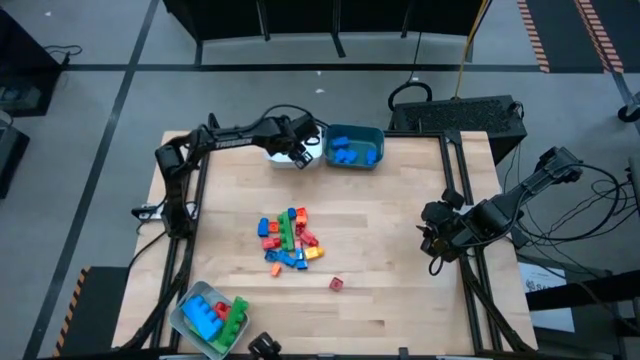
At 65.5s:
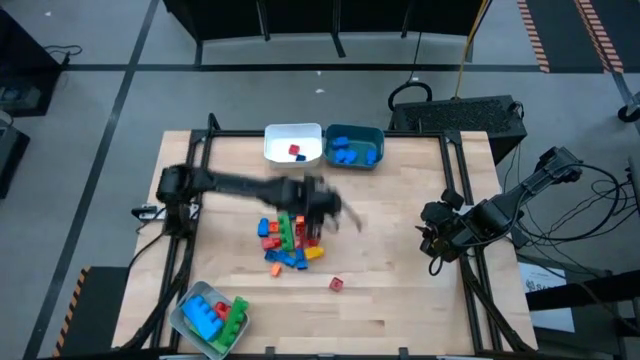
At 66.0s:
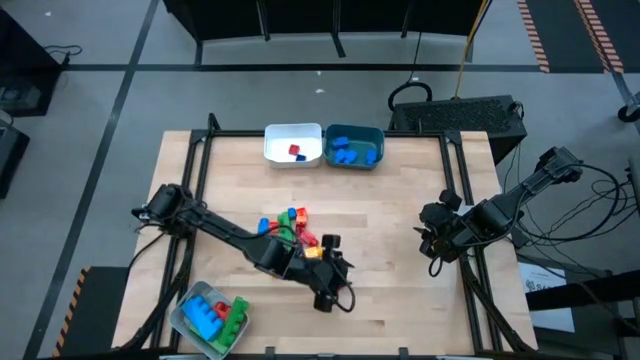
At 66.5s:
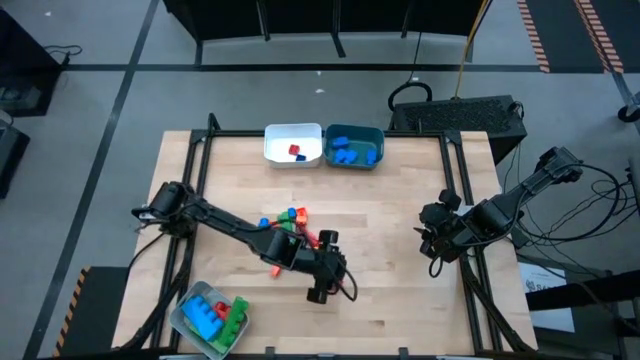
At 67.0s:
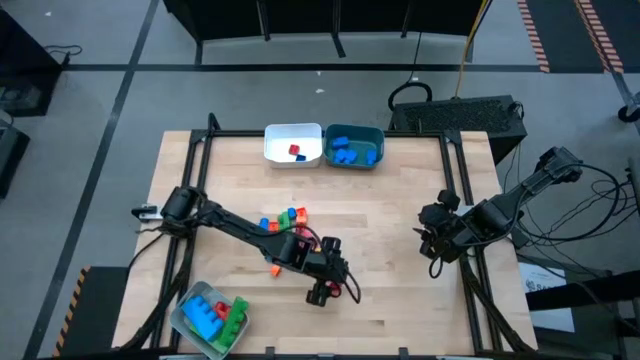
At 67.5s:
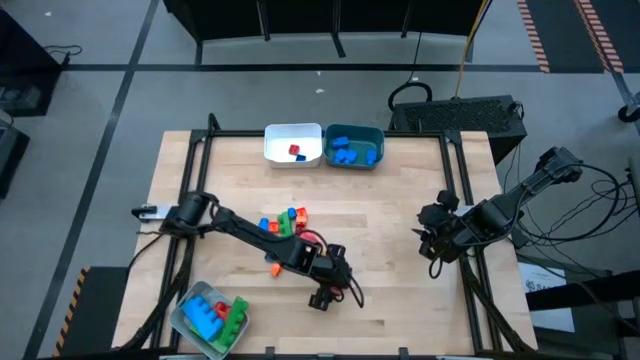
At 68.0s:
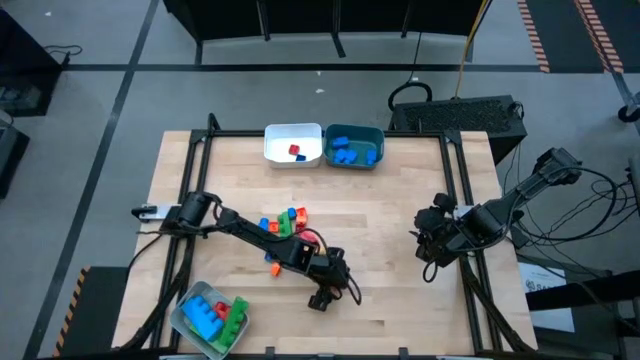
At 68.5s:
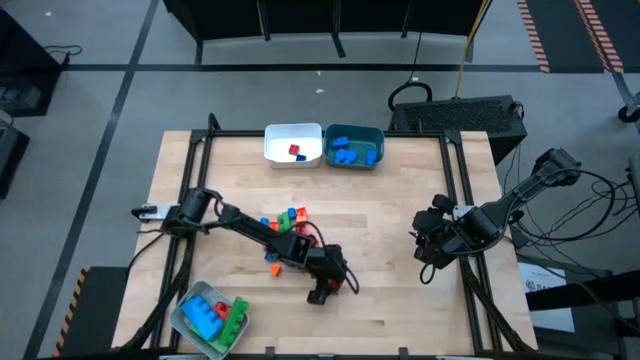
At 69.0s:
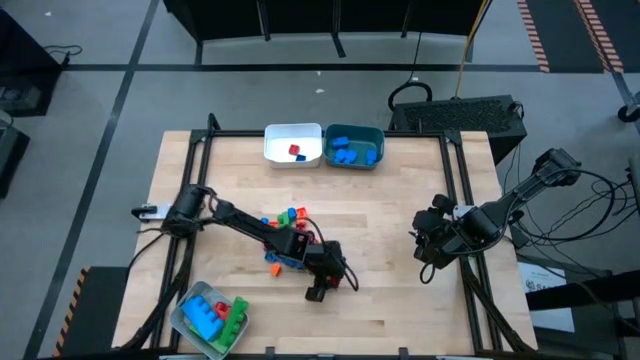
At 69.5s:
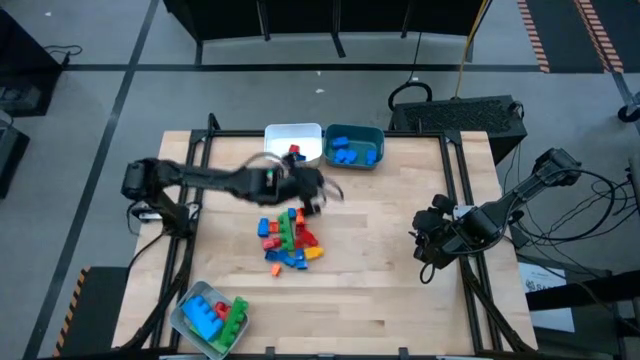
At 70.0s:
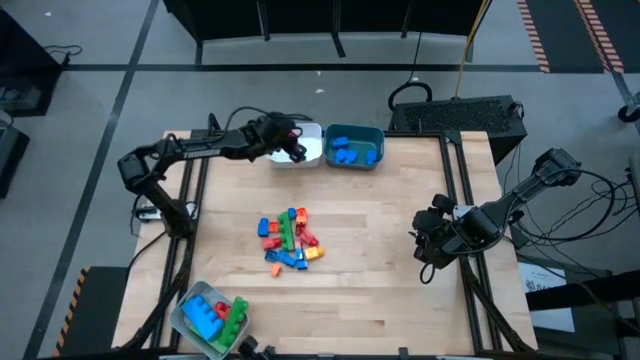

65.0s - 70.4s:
Task: Sort blocks by size
Put the red cube 4 stud game piece into the white bin

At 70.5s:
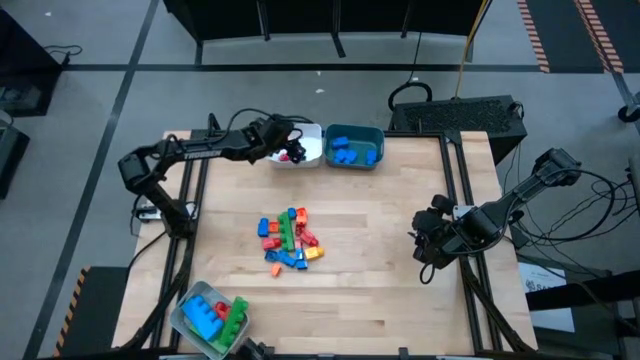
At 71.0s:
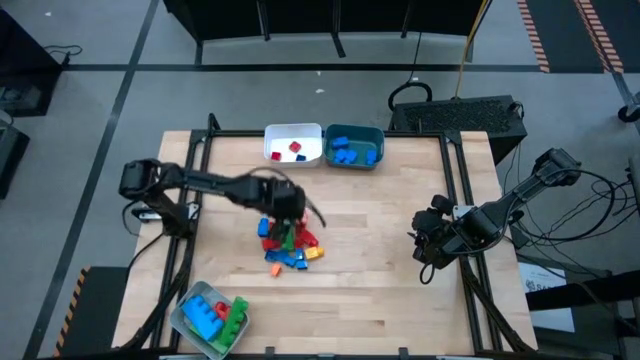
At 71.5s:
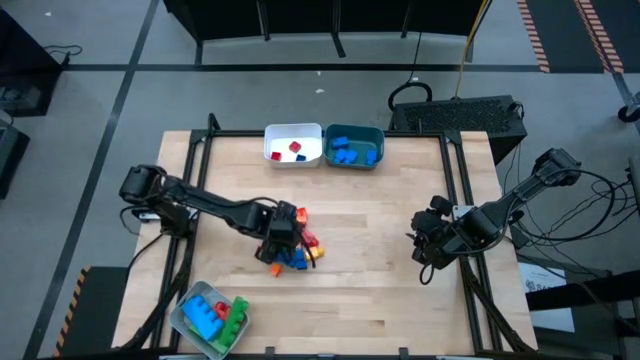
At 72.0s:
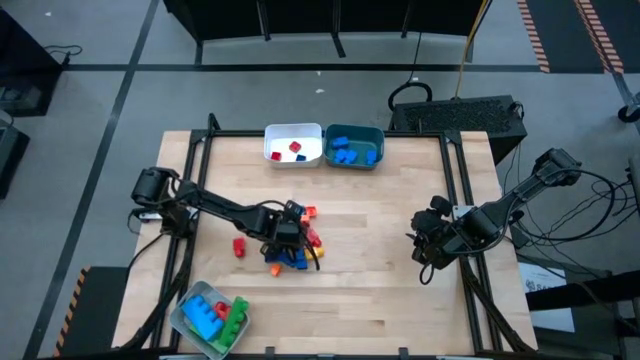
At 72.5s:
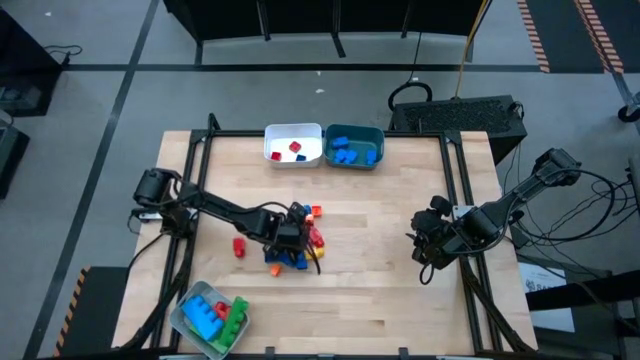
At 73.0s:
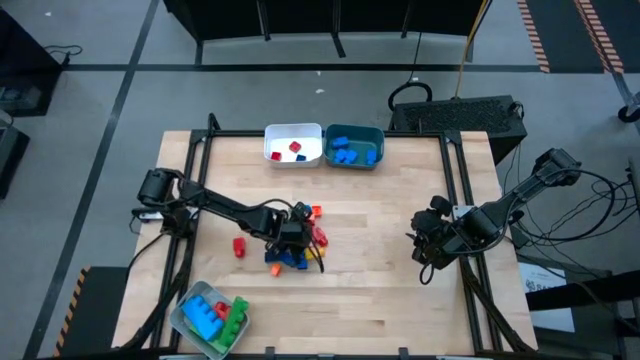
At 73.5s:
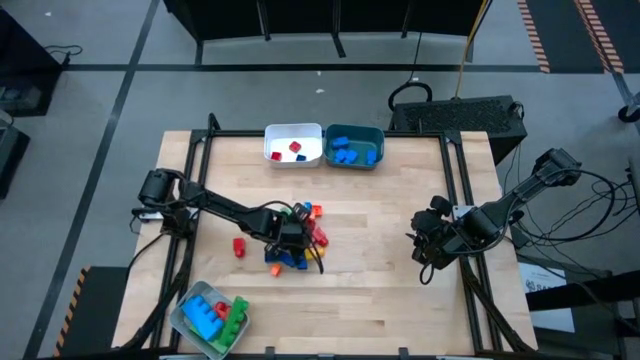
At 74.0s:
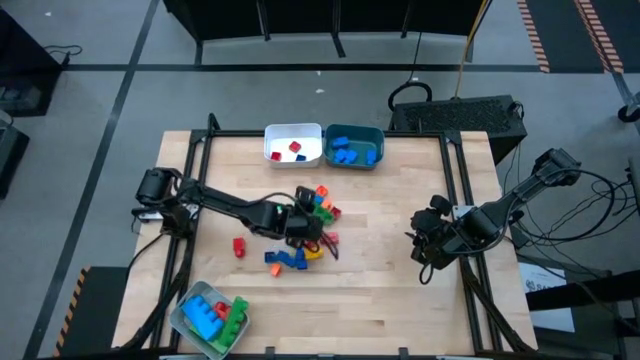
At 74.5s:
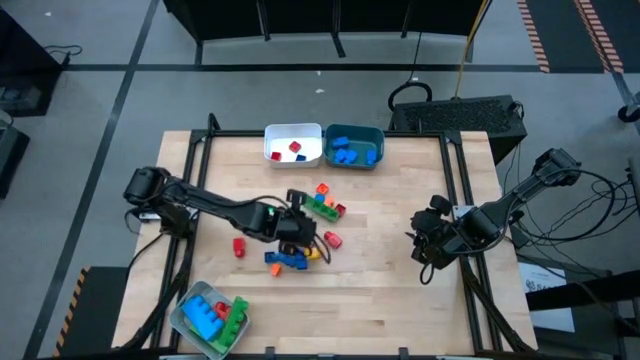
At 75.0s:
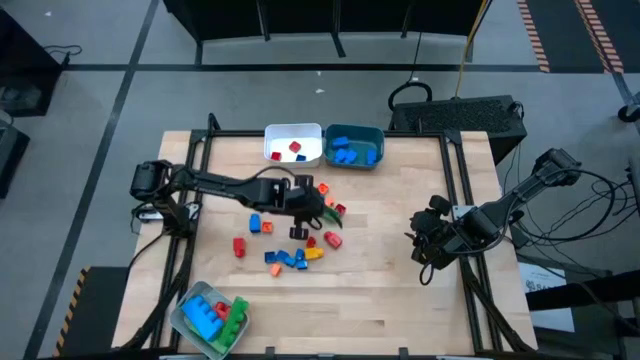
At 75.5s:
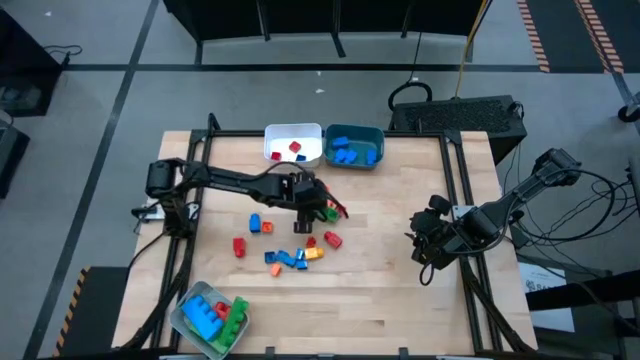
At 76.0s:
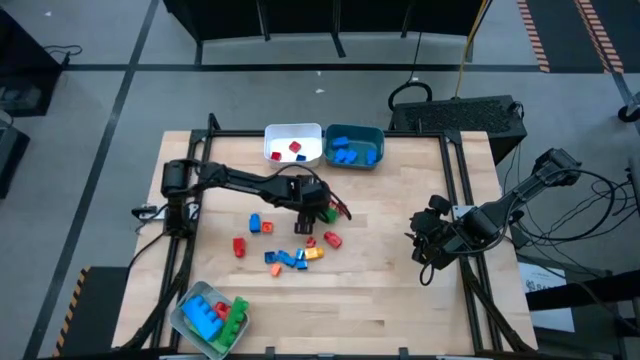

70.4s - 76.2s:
Put the green rectangular 4 stud game piece into the gray bin

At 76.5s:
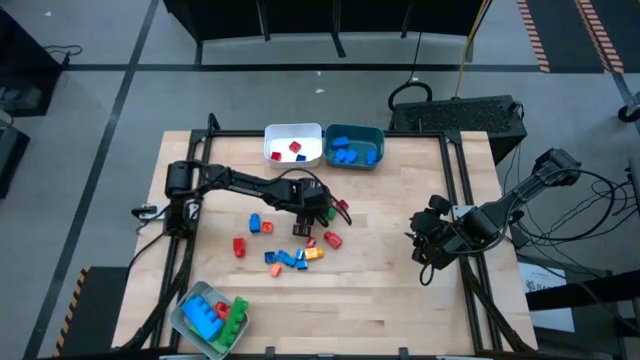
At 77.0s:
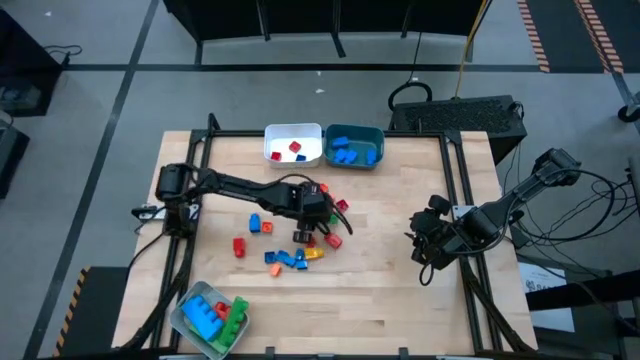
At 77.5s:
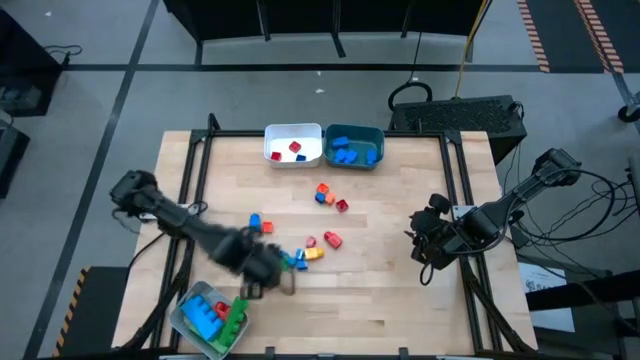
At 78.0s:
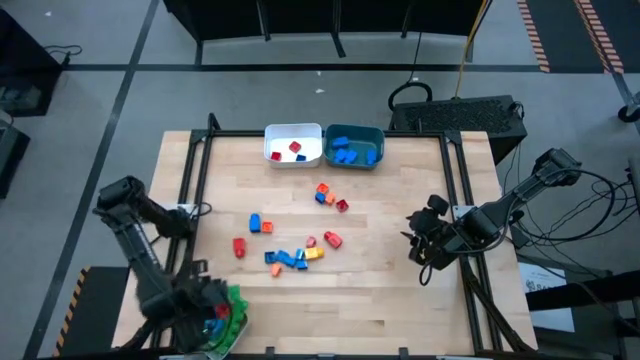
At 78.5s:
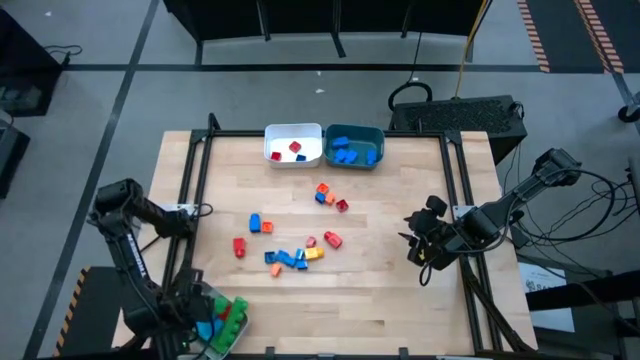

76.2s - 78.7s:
Put the green rectangular 4 stud game piece into the gray bin

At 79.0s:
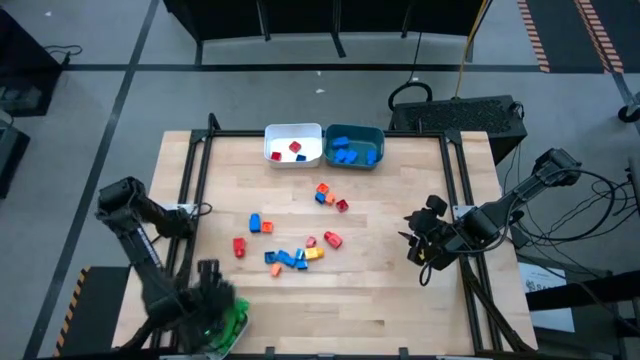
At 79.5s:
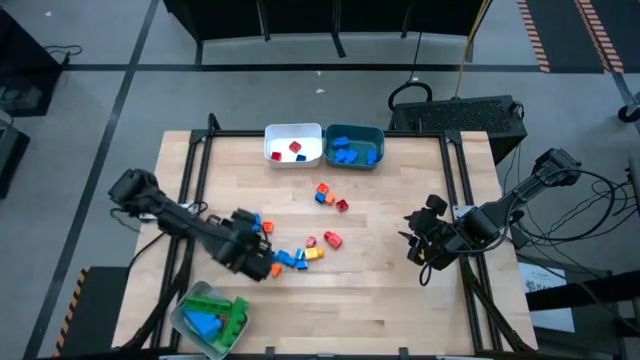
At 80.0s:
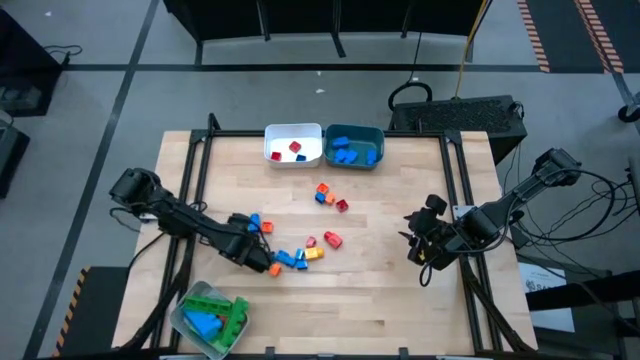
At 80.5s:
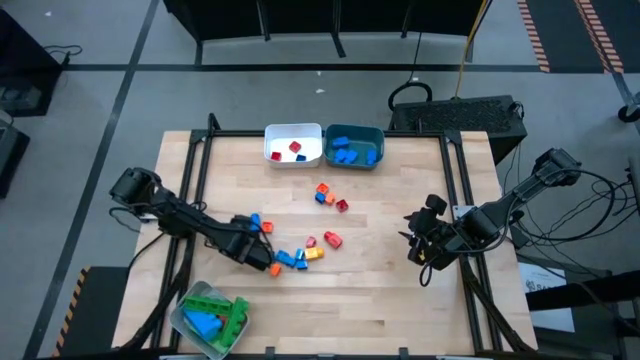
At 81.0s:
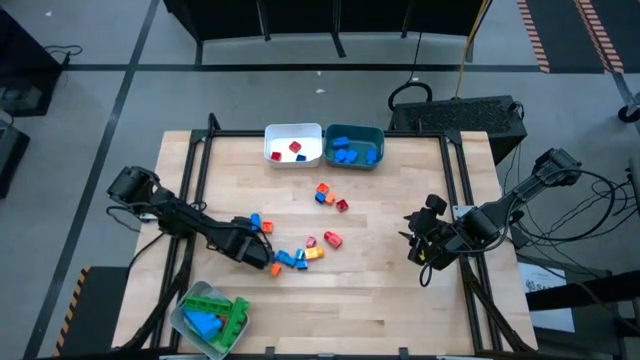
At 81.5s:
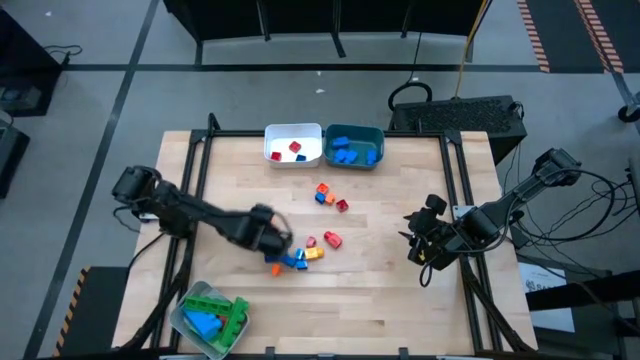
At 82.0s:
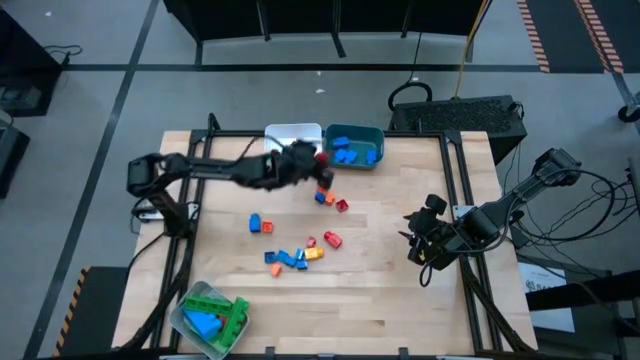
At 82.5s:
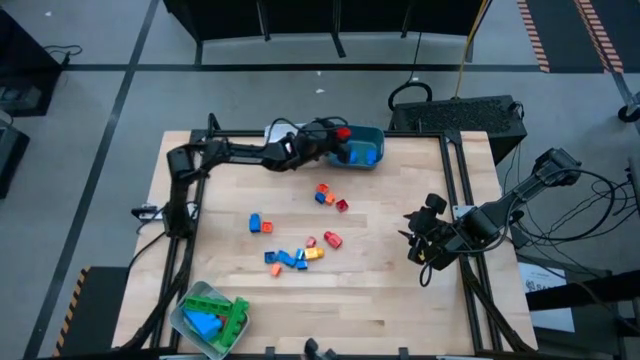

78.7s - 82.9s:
Put the red 1 stud game piece into the blue bin

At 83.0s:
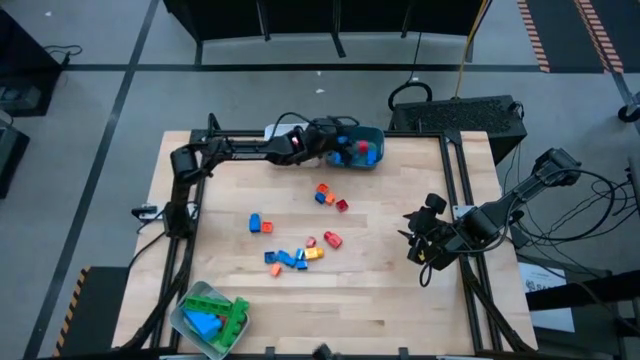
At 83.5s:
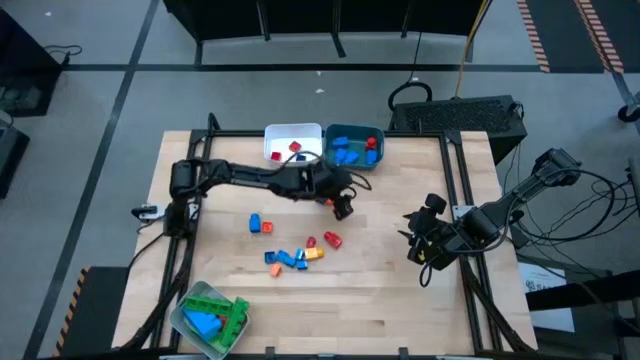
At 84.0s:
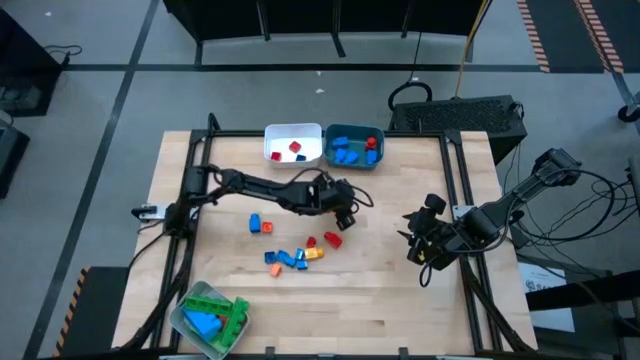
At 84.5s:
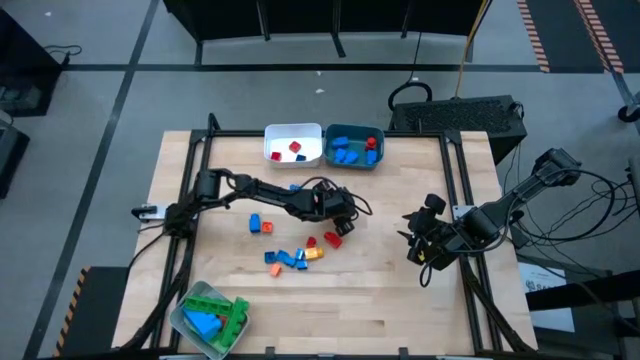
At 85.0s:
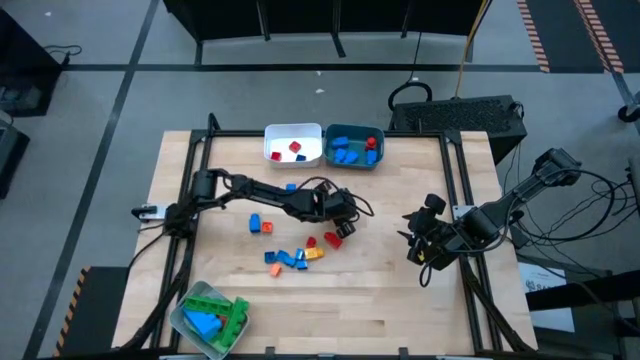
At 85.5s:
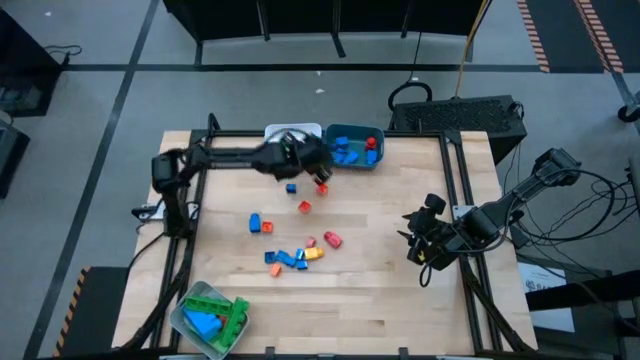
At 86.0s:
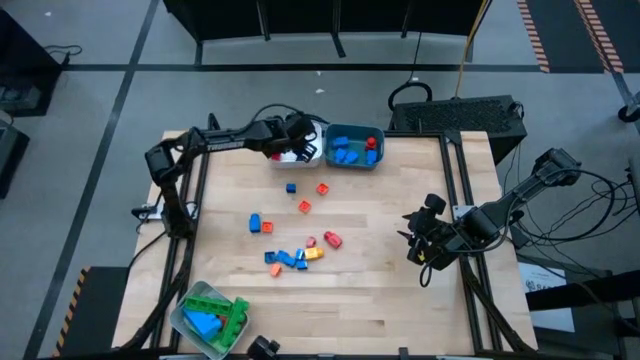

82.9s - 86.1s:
Put the red cube 4 stud game piece into the white bin
